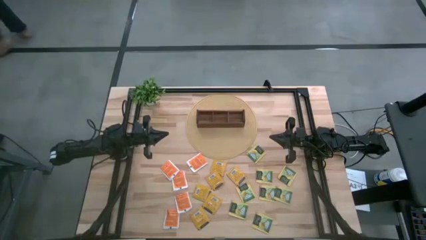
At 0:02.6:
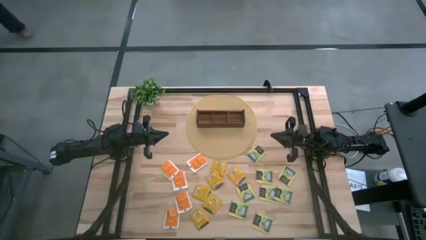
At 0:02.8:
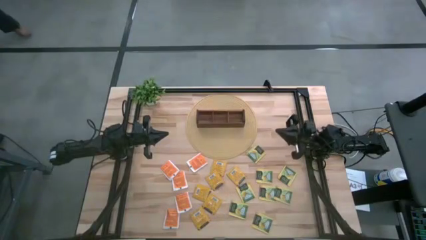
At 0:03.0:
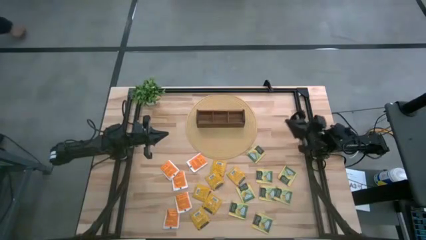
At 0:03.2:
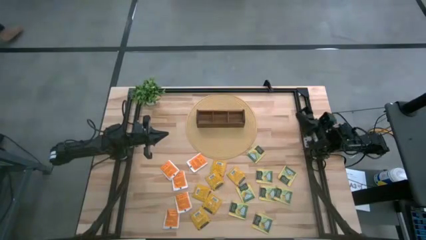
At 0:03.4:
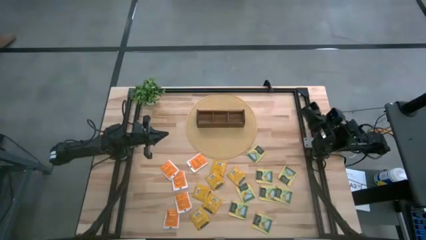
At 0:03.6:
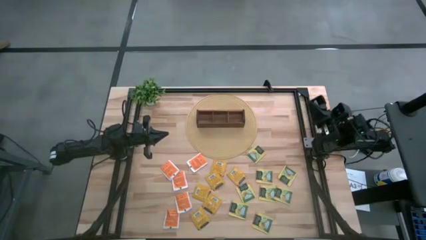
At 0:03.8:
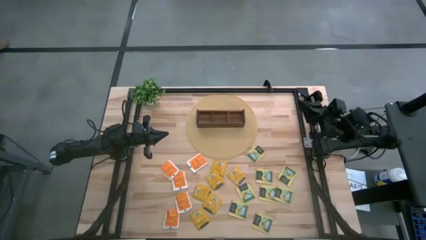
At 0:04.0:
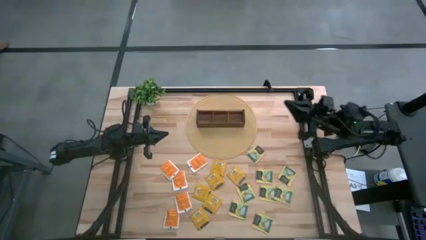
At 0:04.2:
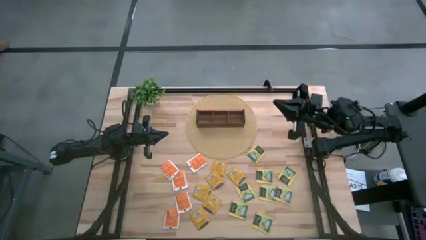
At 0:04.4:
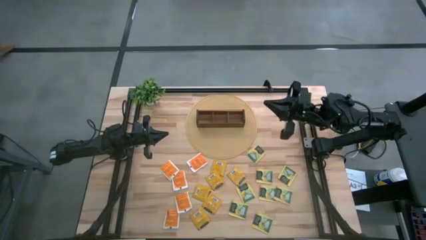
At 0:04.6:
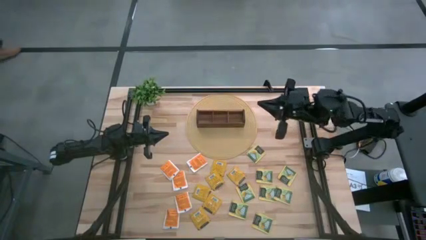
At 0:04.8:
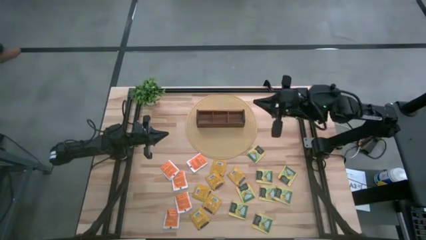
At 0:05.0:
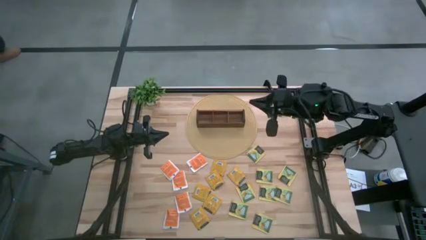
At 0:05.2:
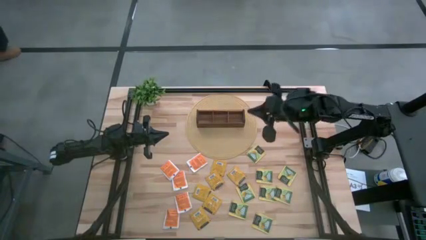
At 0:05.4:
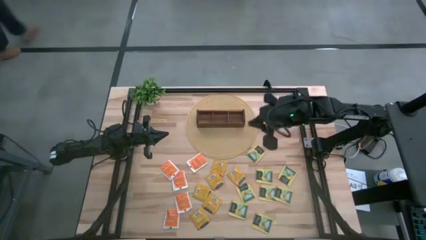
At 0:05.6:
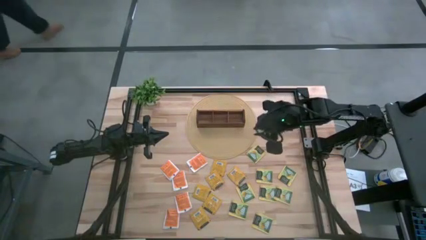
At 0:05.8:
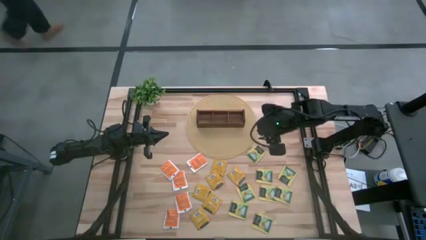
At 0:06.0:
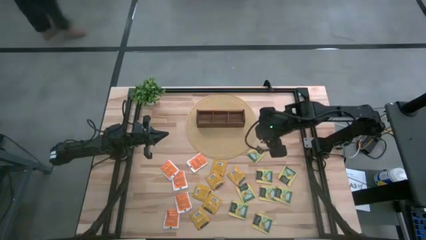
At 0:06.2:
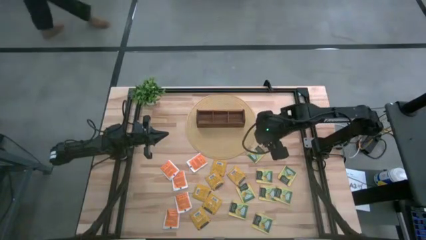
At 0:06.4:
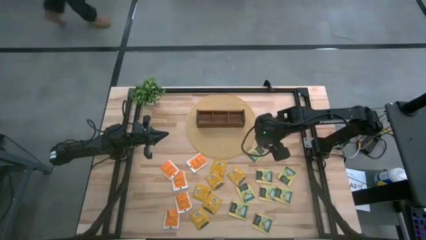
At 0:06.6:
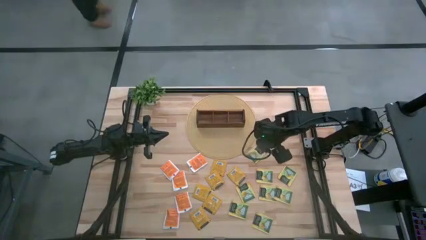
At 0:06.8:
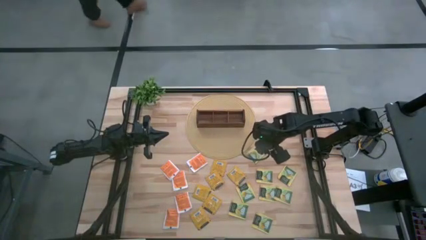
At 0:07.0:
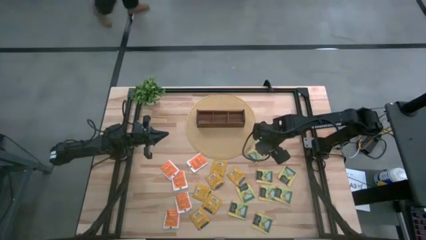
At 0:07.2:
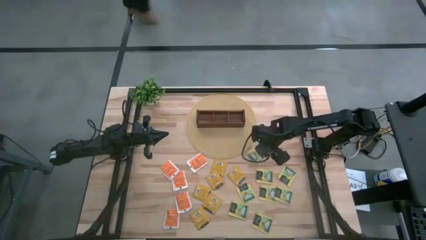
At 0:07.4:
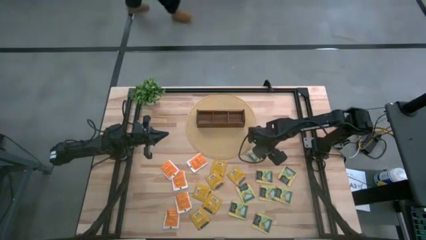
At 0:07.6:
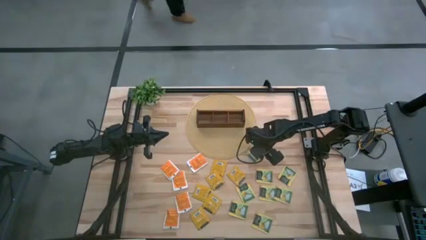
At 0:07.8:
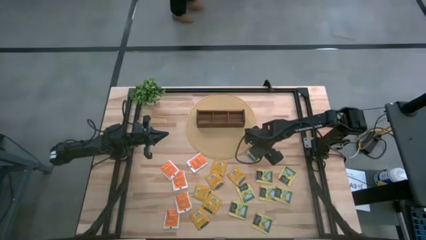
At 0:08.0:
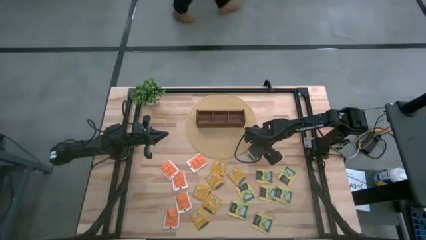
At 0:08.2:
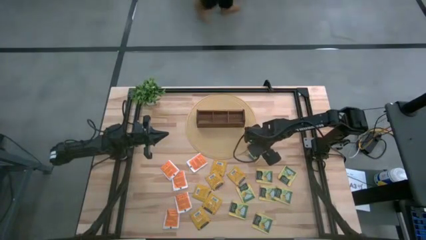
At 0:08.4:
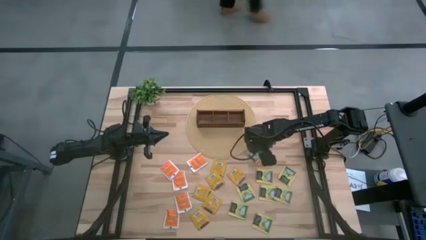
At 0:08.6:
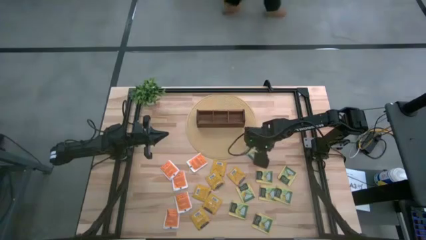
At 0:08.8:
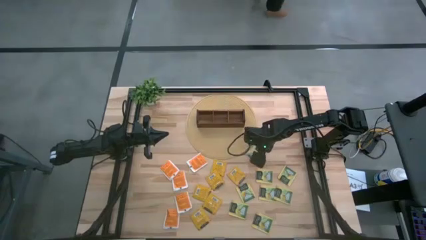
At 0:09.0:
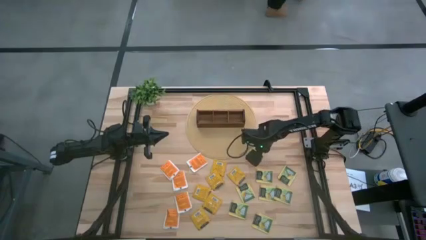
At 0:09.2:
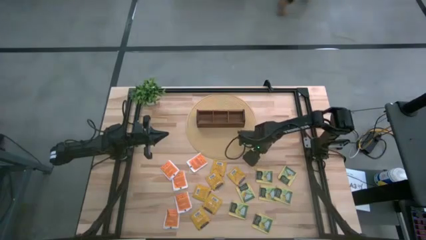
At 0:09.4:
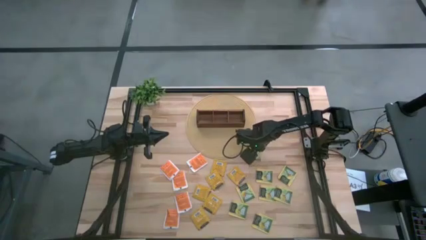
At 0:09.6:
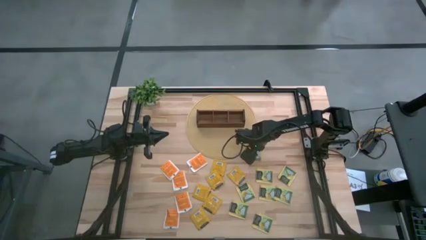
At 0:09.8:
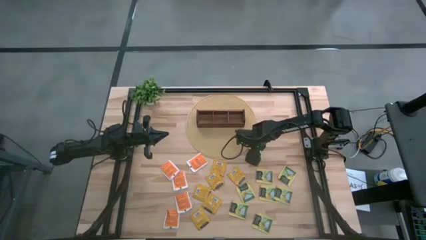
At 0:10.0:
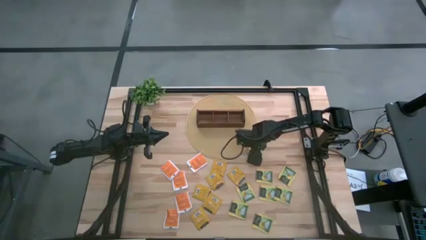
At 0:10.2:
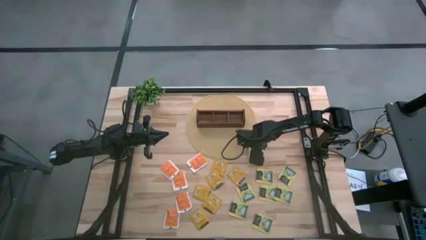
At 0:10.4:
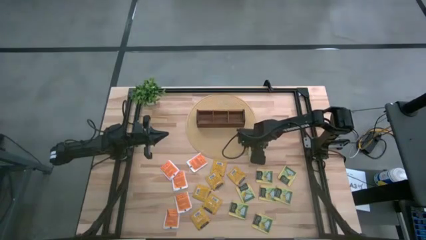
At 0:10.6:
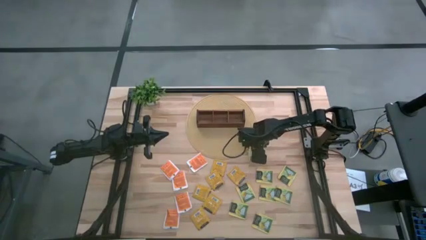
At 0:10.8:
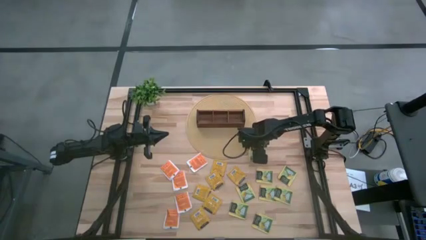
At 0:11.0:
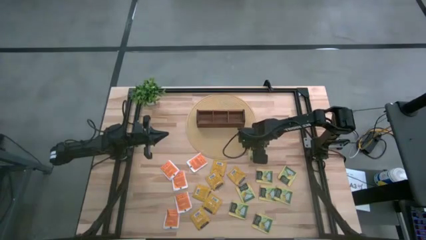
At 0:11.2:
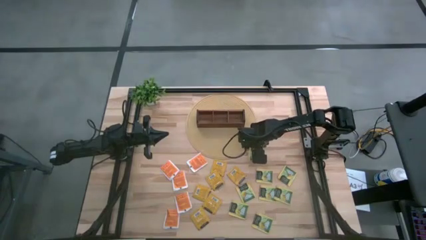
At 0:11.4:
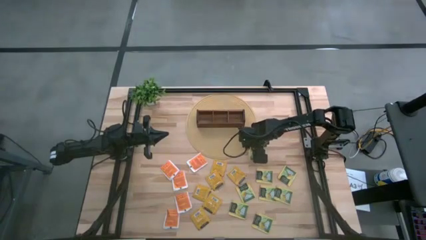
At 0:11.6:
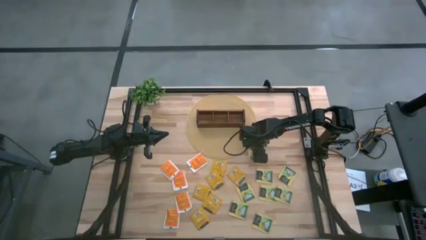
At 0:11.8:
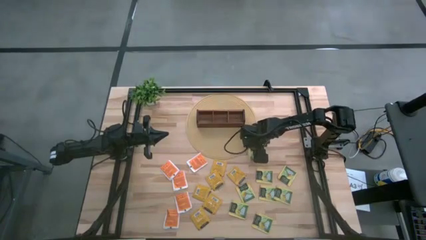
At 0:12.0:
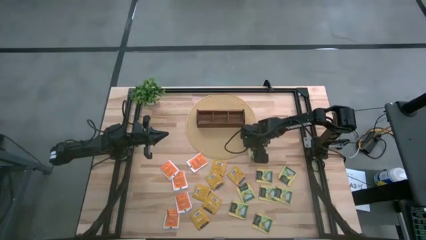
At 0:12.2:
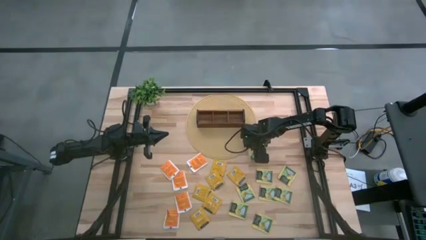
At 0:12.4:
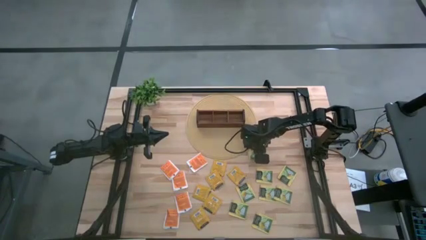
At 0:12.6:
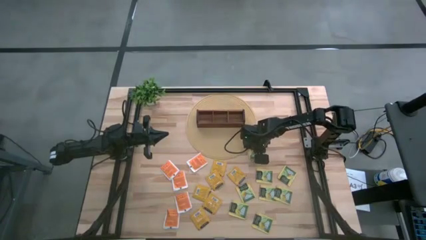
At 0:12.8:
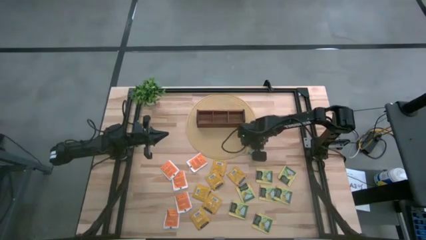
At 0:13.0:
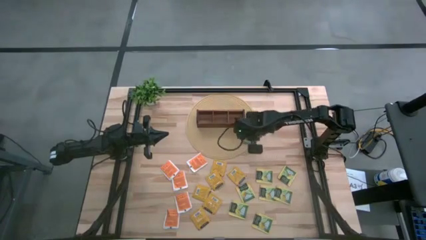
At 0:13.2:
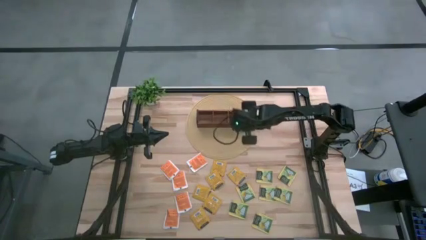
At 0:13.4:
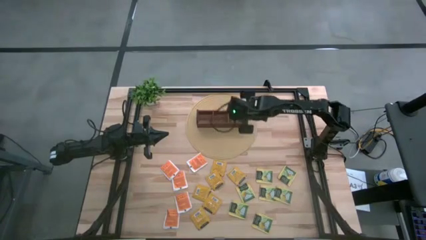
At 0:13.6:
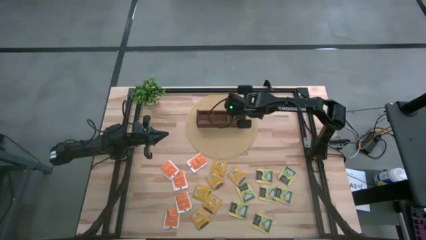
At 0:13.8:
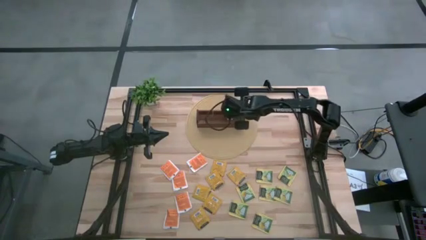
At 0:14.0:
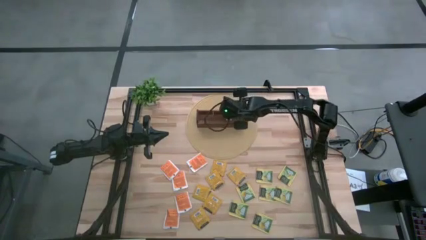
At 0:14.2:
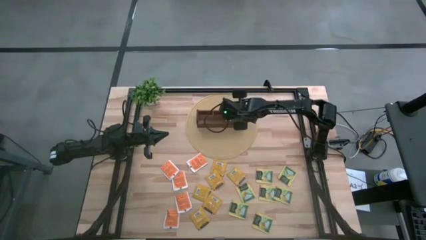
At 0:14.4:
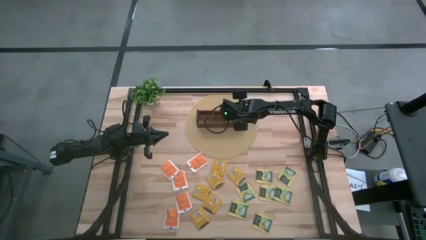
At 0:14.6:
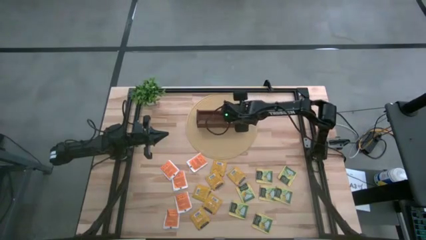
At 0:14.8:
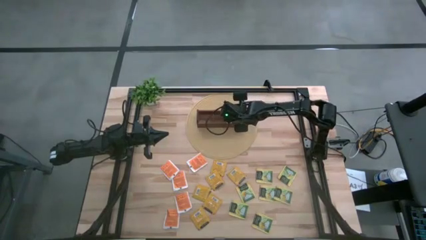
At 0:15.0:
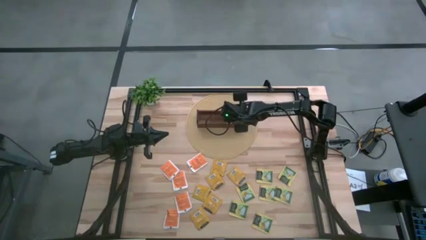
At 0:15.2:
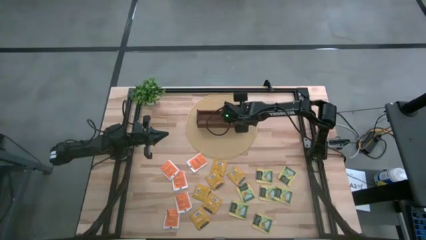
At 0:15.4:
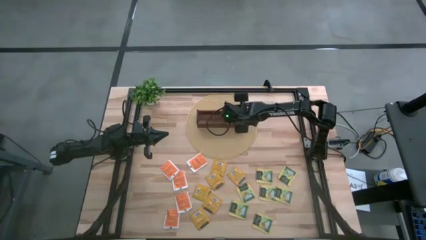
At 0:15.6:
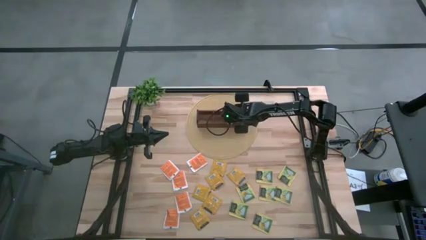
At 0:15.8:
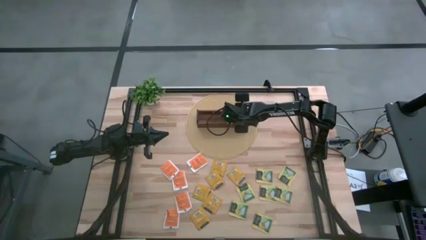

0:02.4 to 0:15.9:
Task: Pick & Place Tea
Put the yellow tea bag into the right section of the wooden organizer
